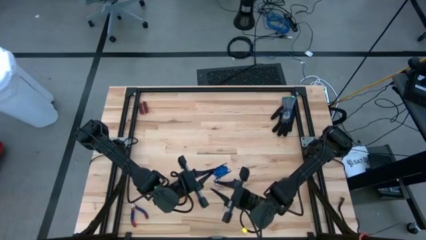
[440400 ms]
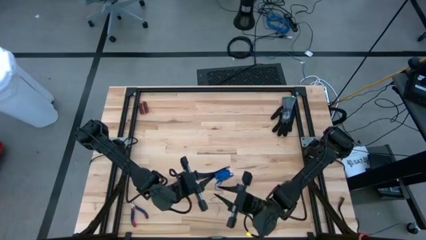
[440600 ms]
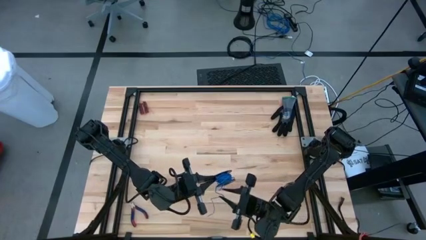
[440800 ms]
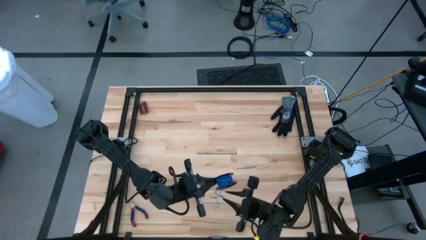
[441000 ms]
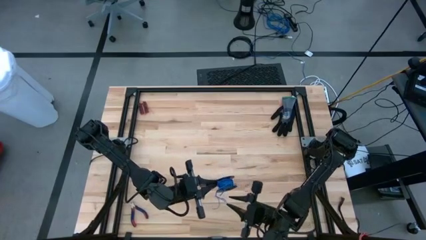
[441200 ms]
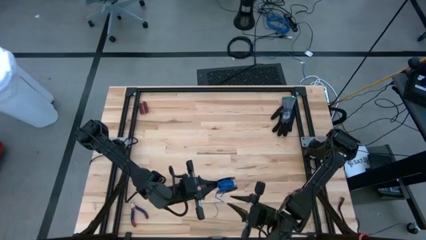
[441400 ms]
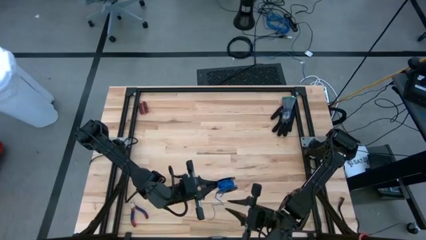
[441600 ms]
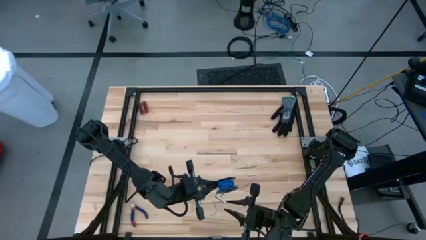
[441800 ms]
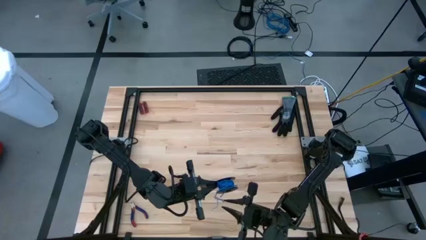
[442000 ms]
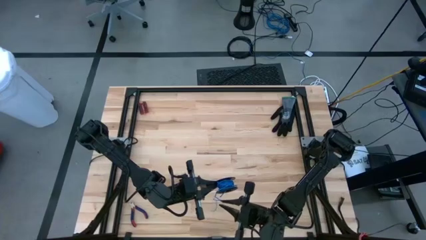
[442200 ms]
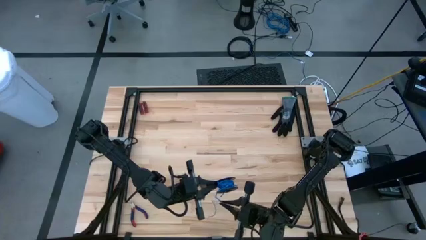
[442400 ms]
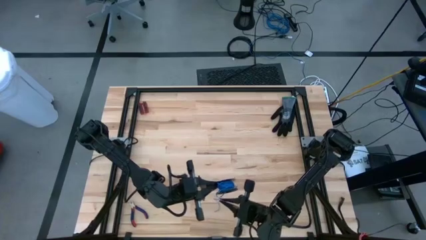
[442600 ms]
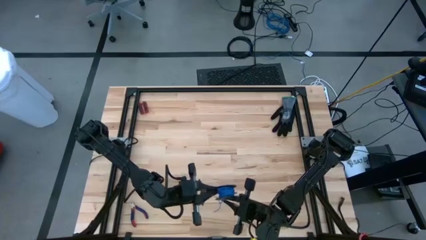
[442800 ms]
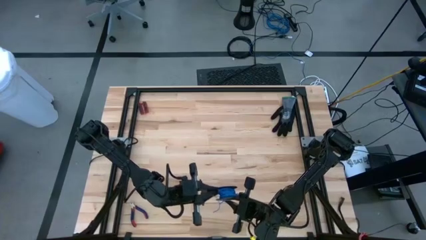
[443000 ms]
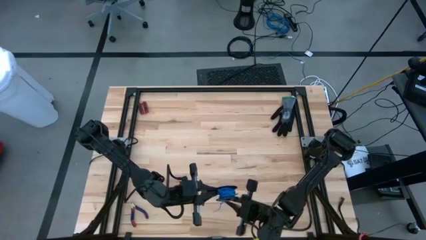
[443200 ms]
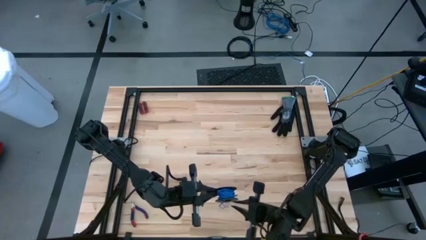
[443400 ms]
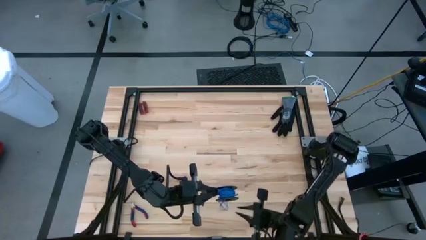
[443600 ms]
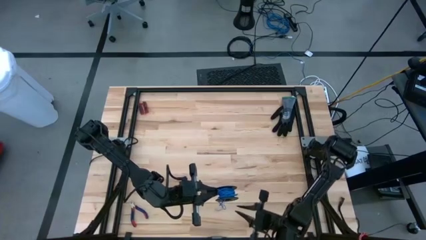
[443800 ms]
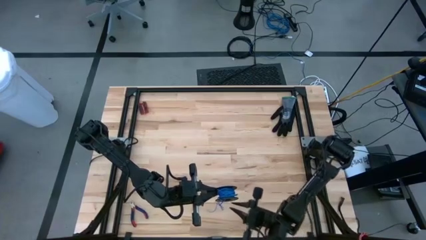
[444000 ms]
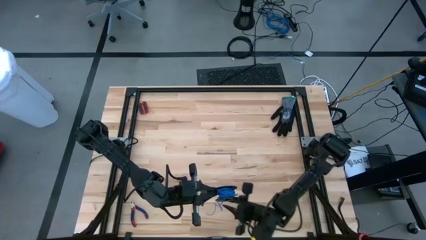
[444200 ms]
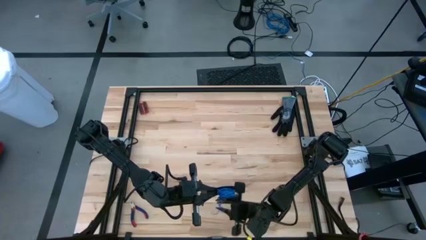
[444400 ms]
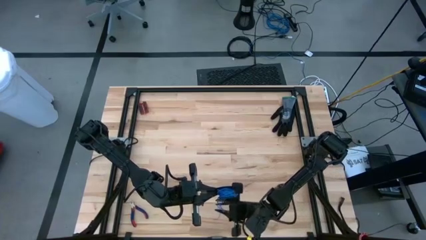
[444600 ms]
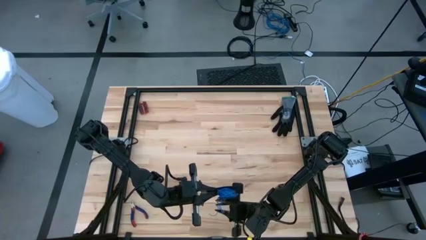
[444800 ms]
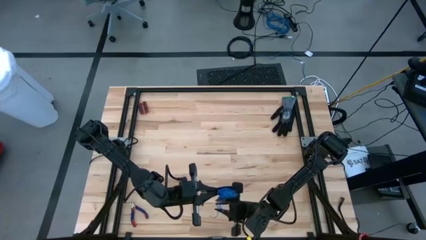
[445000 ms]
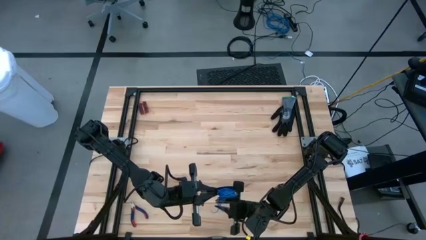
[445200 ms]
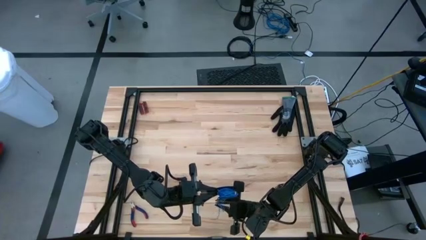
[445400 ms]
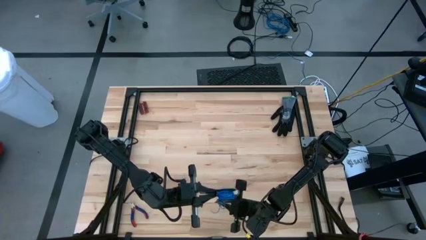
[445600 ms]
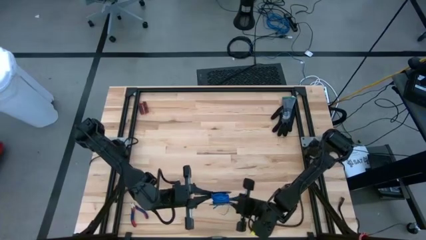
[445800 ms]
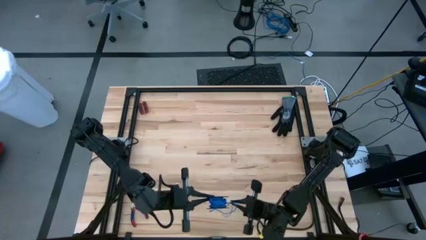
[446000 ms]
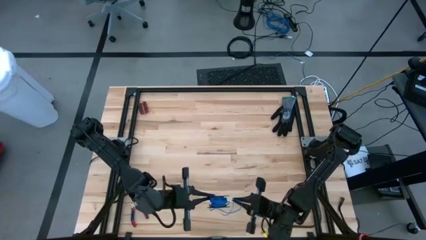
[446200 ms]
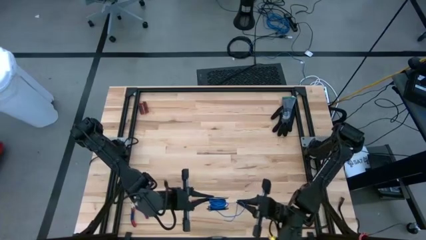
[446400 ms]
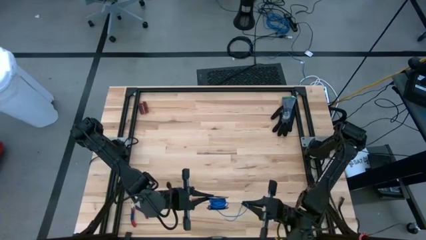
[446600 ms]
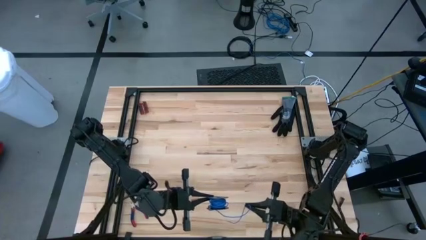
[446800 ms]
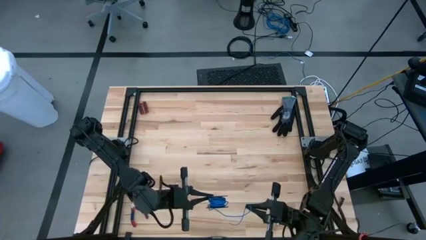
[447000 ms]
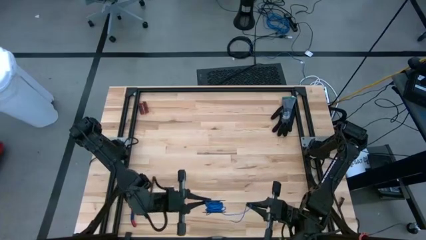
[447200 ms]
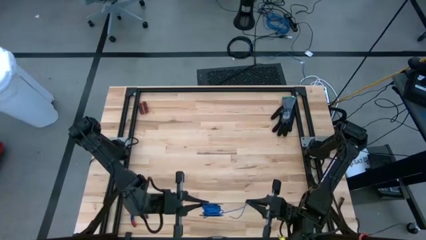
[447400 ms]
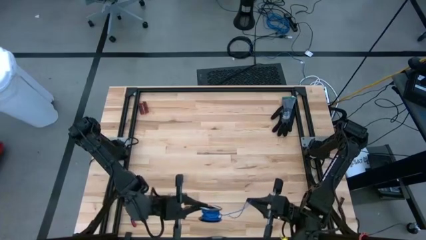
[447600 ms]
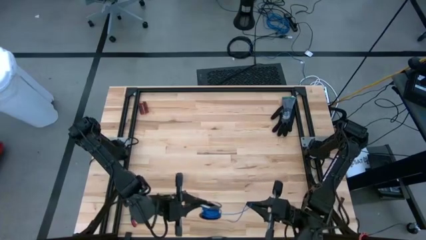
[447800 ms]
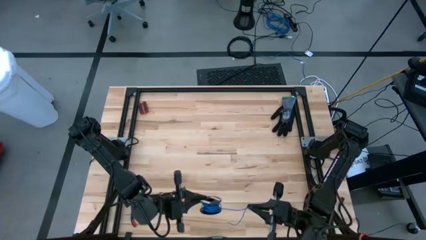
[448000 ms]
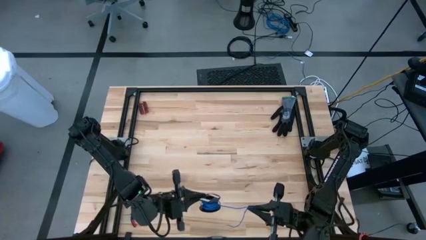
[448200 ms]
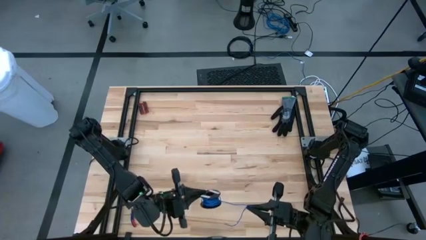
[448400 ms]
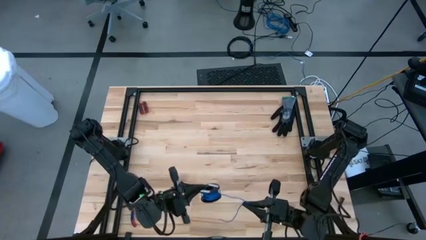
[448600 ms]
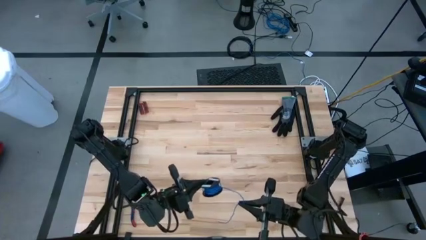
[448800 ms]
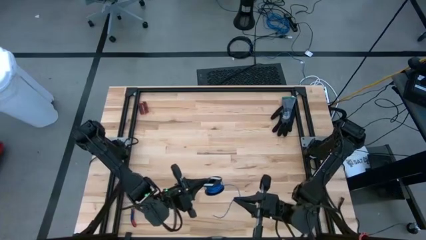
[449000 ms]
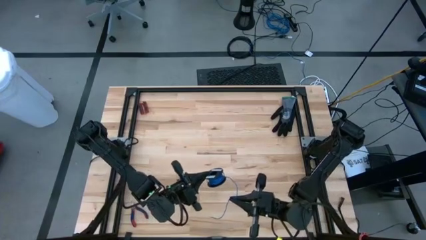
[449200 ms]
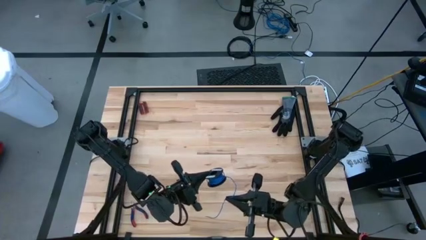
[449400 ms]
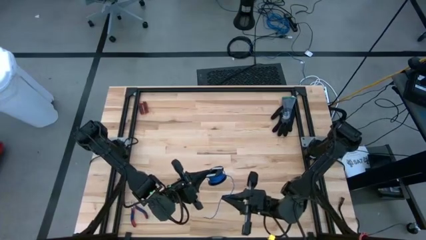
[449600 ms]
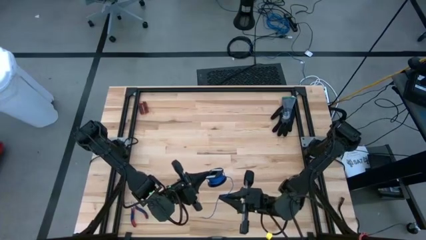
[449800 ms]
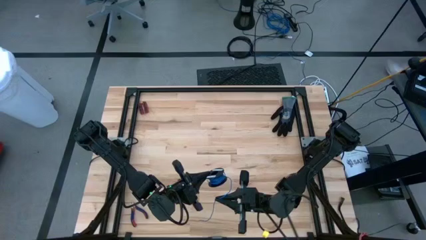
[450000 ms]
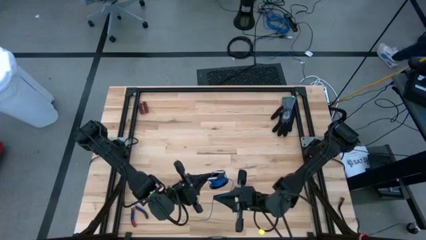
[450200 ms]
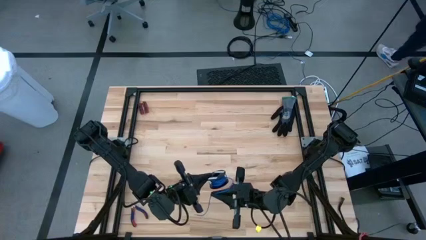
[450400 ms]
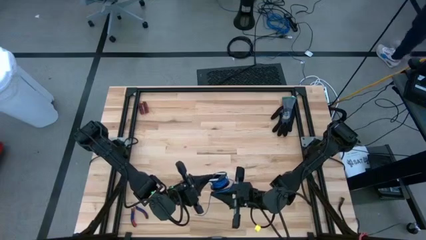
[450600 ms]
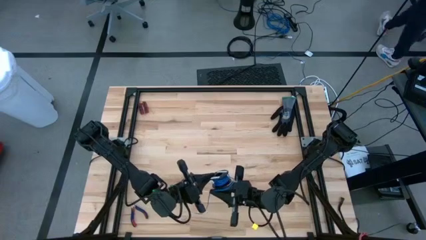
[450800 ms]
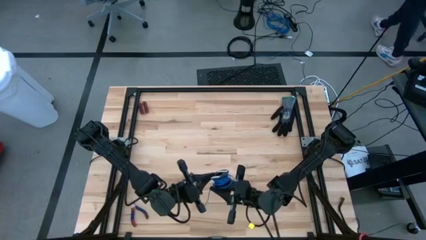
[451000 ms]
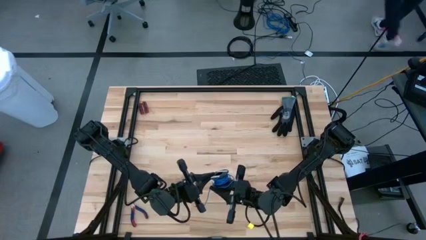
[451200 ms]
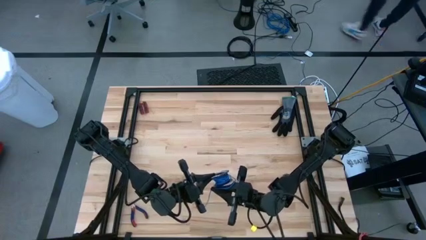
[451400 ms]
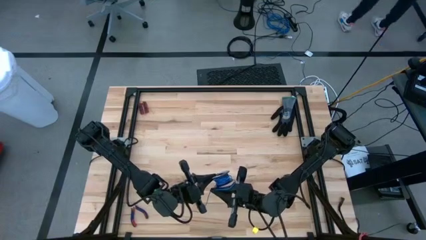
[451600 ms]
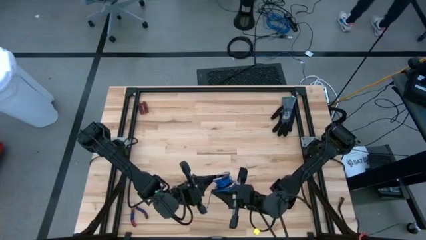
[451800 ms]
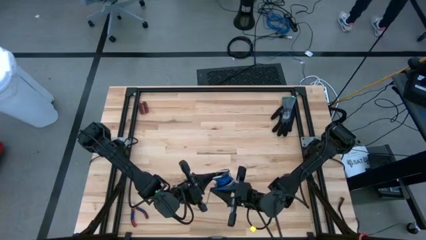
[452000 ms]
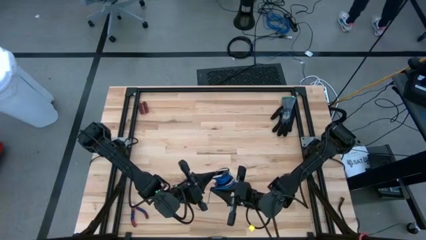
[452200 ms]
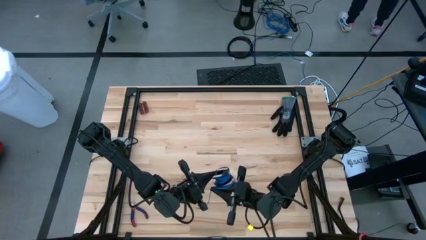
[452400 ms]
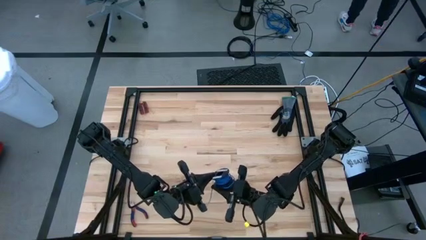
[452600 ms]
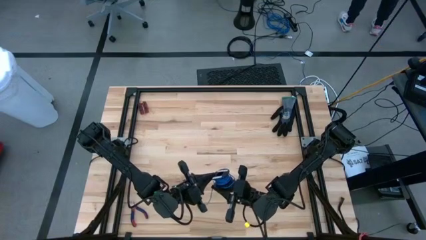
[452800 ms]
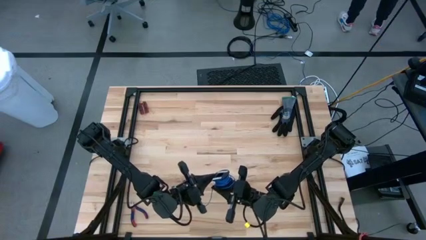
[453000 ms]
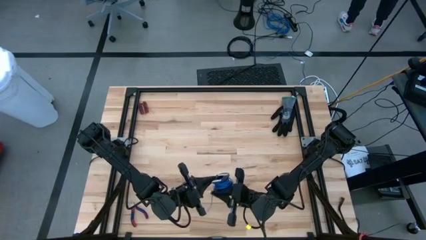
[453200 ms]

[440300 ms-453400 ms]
Task: Coil cords
Coil the green wire onto a spool

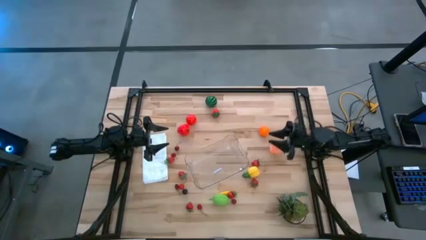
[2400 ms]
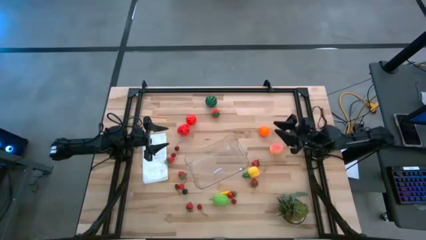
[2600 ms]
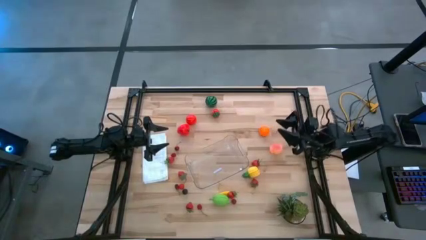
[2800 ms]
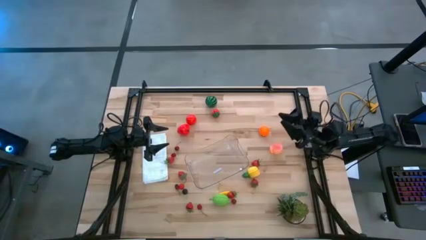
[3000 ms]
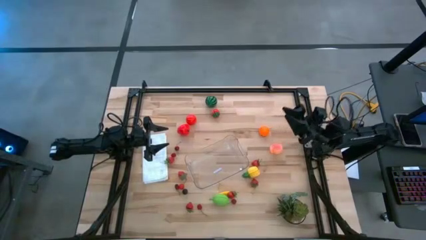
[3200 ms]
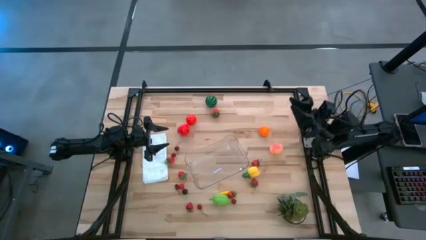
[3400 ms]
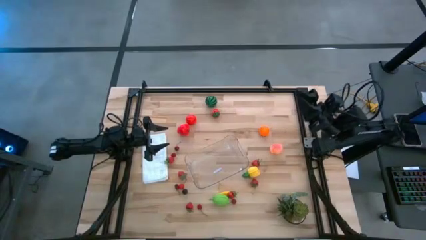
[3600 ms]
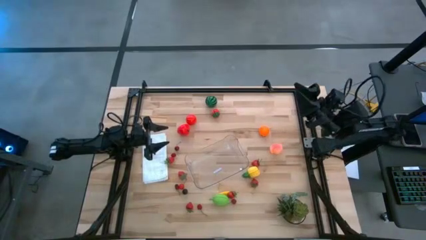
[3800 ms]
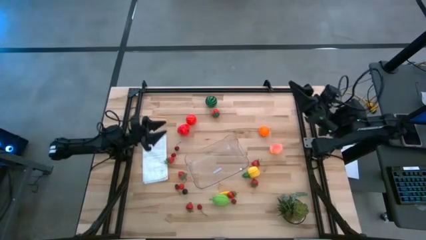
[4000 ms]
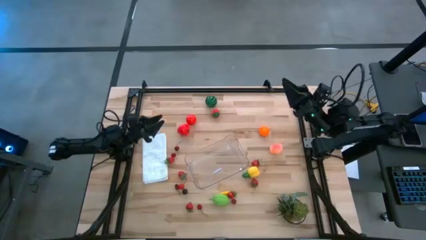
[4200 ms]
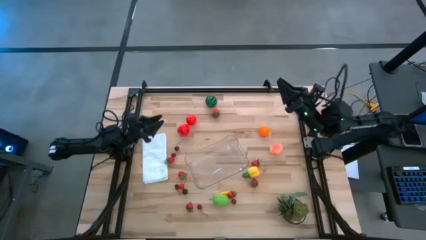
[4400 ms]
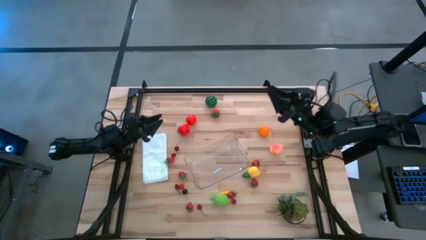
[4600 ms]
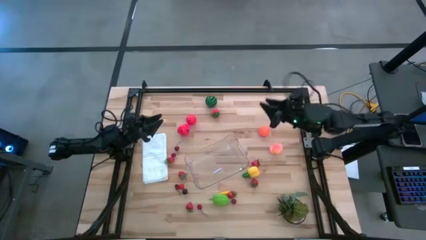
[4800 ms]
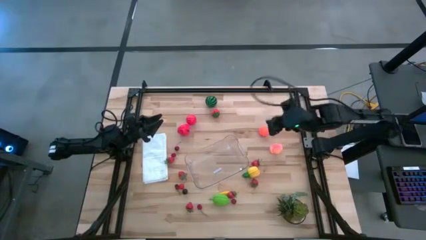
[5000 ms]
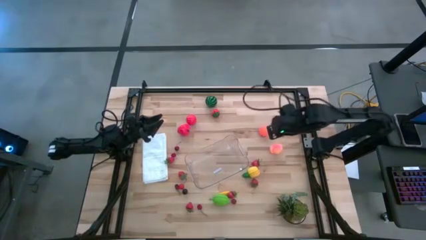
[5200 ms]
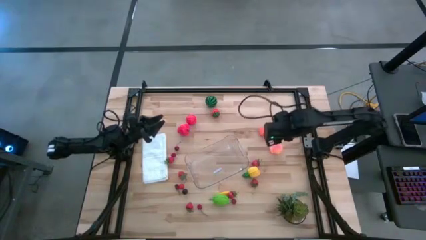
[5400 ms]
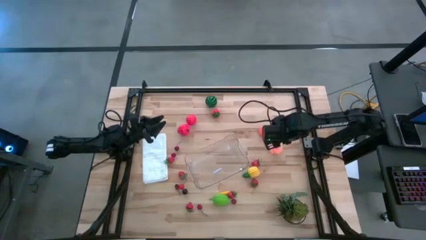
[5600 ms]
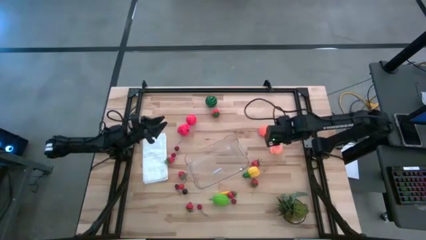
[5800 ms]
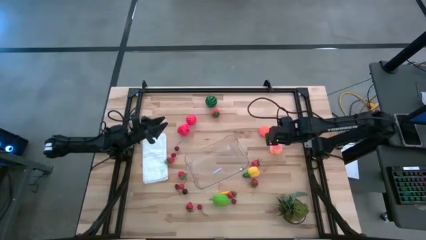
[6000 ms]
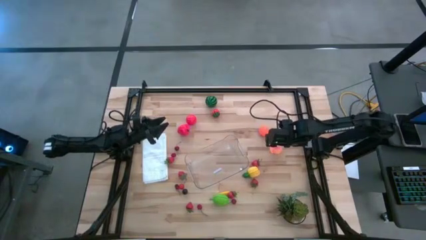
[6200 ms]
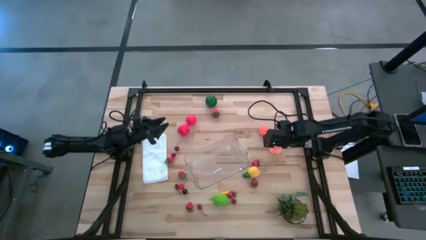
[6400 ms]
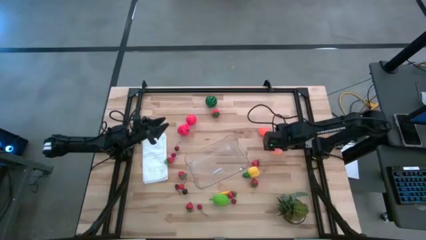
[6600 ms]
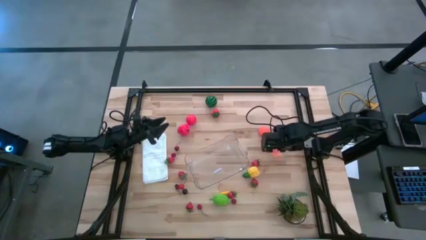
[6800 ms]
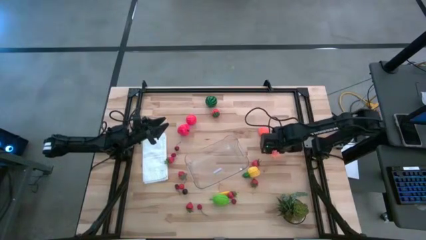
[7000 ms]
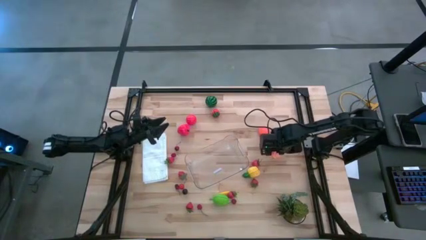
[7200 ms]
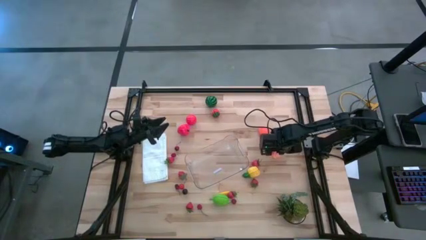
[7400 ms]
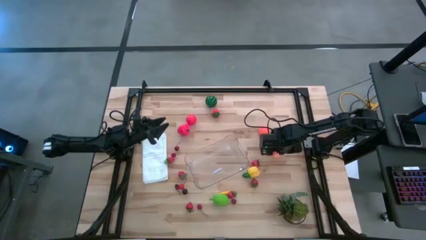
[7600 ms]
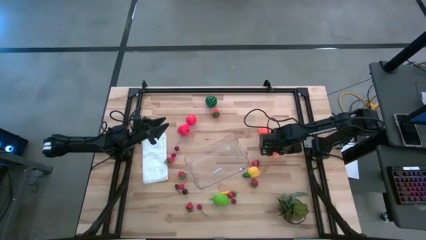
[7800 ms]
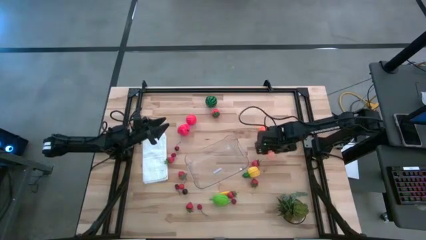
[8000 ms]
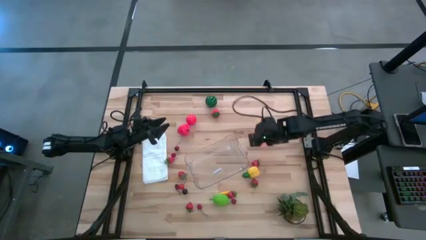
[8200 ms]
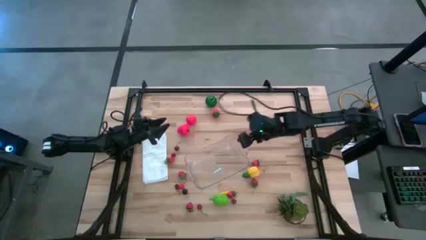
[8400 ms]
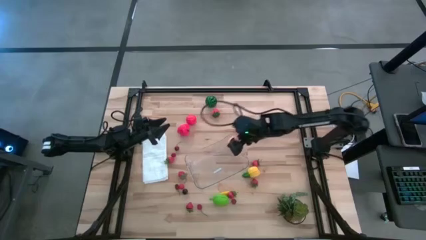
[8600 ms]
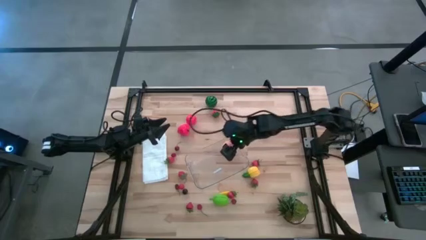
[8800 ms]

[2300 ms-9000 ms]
Task: Pick and placing Produce into tupperware
Put the peach into the transparent bin
